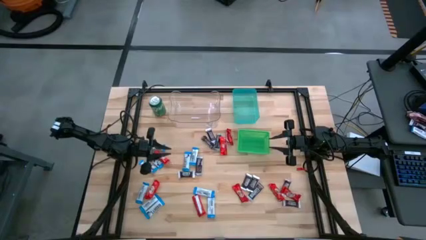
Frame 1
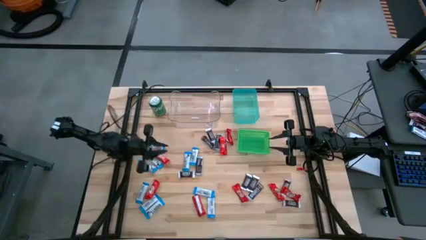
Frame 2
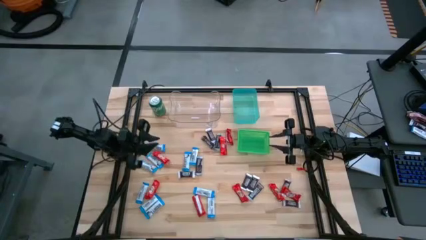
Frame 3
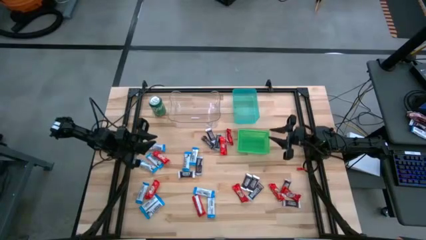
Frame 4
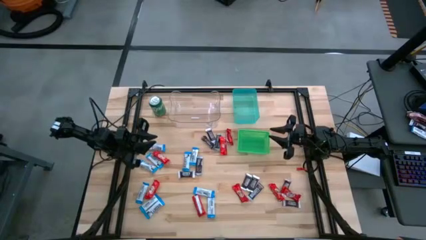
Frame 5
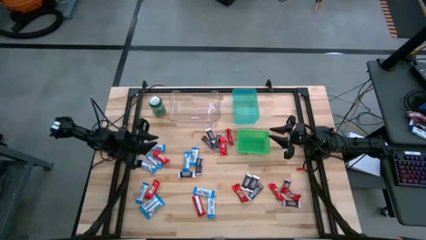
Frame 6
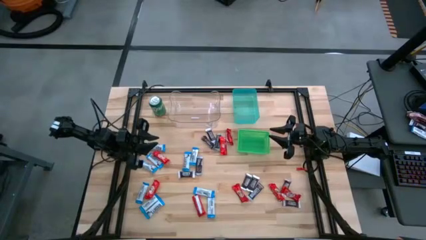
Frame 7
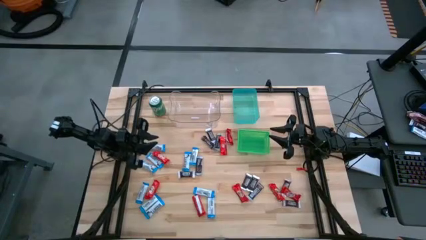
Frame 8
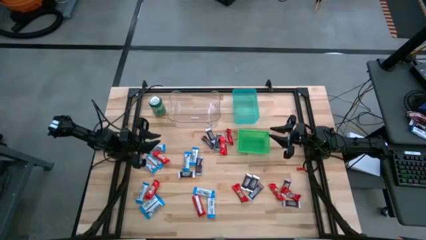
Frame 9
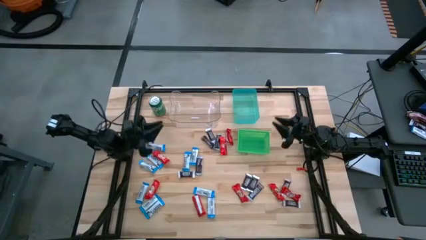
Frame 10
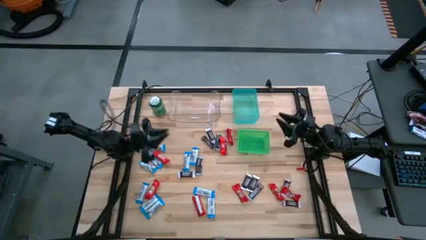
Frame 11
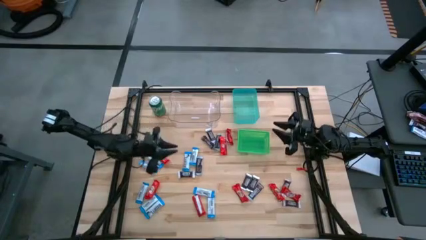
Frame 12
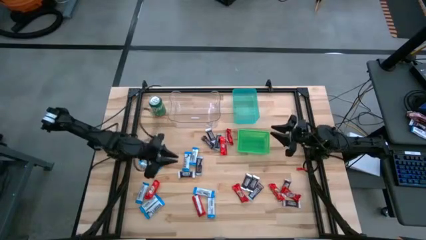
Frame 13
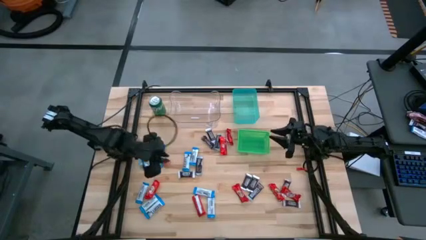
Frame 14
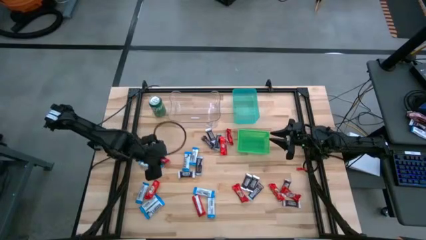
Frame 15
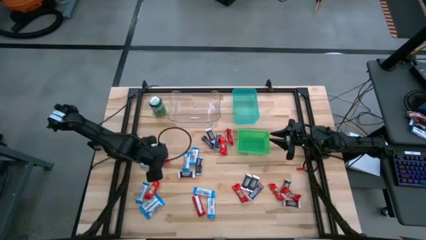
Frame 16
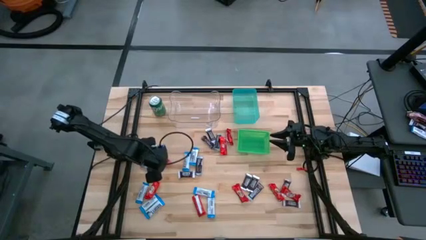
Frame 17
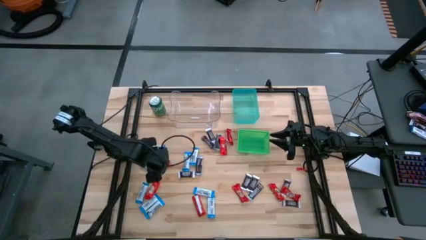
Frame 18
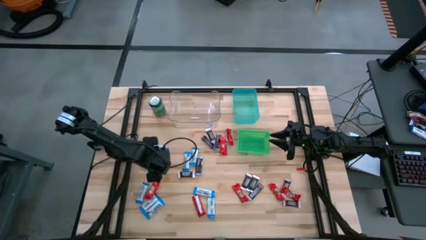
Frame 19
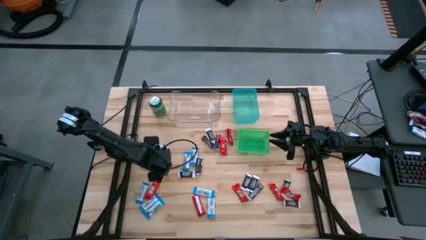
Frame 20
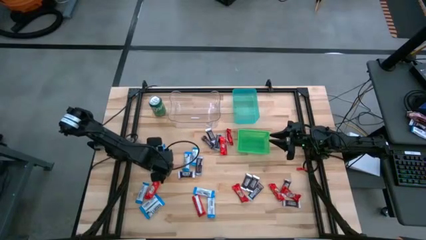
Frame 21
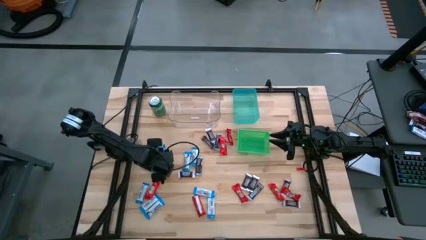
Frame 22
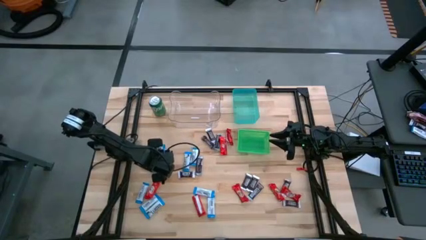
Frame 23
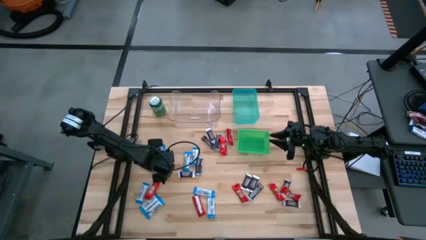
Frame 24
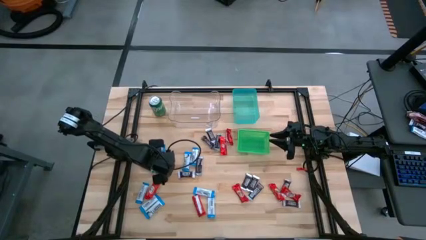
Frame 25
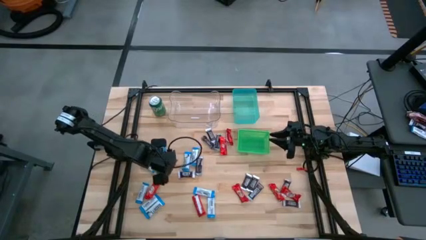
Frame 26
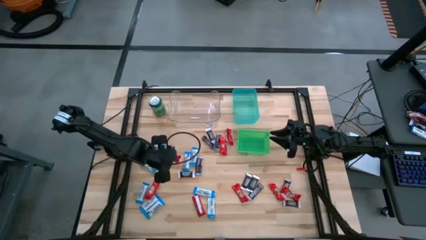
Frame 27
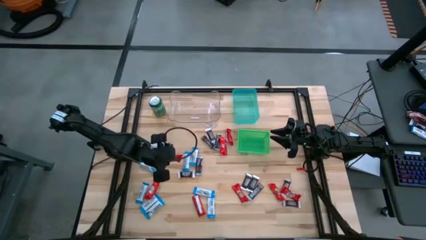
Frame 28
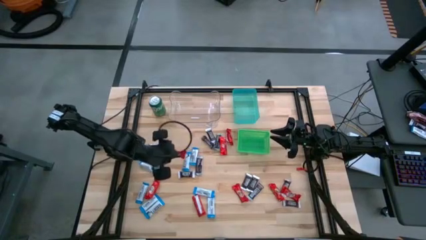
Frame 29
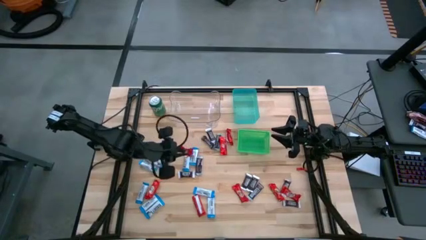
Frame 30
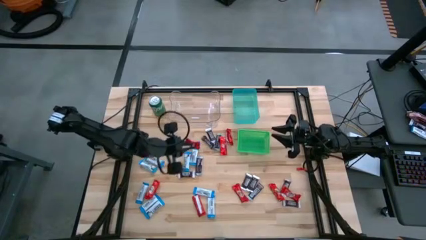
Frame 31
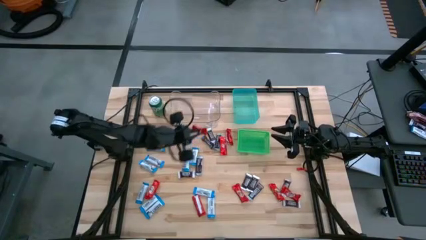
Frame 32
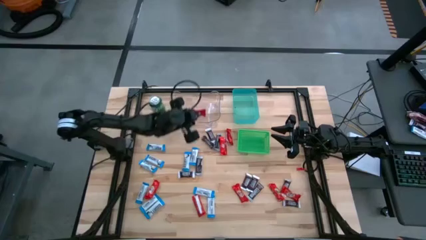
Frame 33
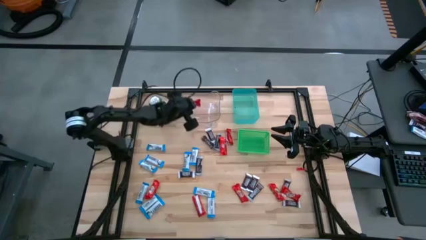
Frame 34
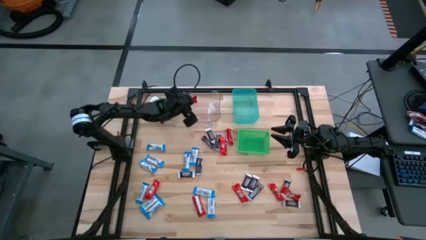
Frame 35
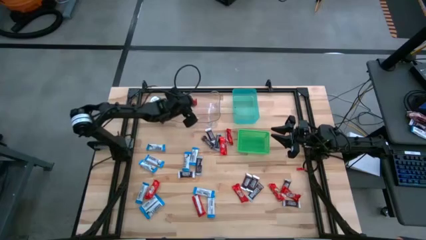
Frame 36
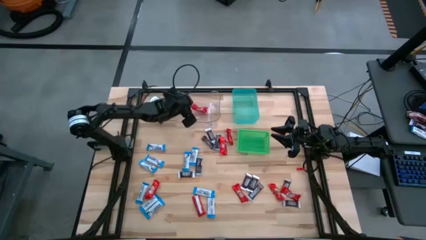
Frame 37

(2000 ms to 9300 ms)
Task: Sort candy
Put the red chocolate bar into the transparent bin

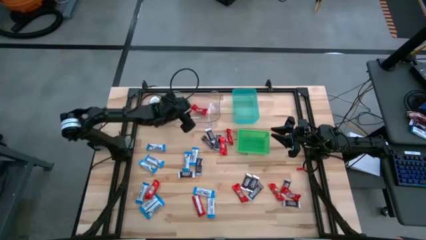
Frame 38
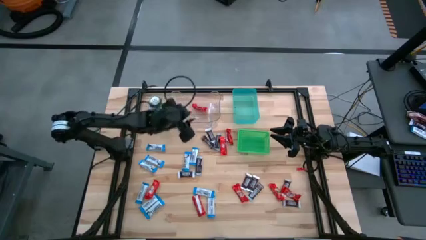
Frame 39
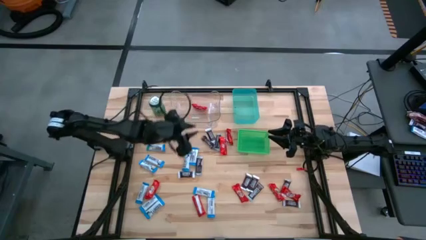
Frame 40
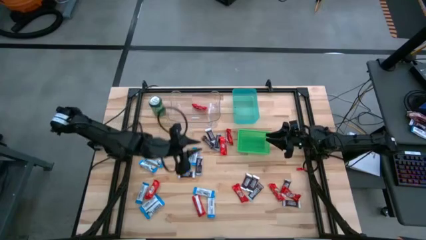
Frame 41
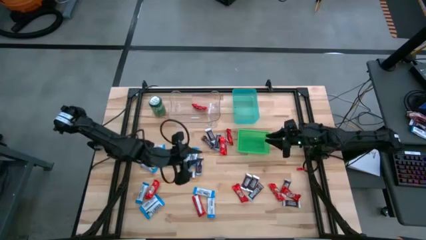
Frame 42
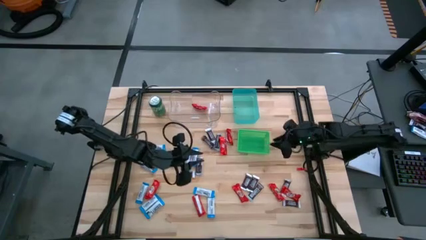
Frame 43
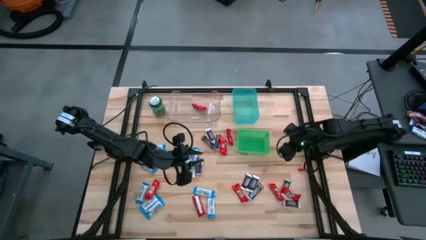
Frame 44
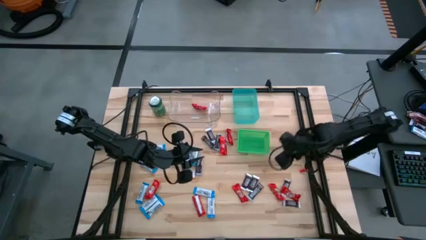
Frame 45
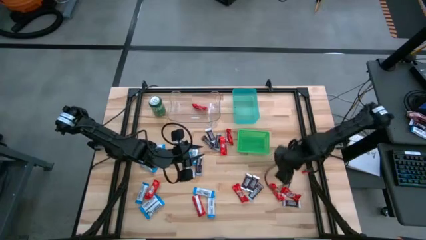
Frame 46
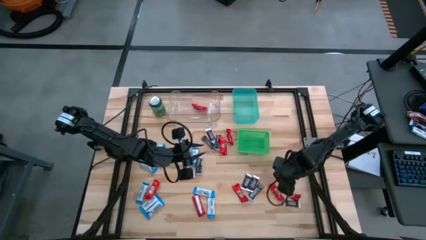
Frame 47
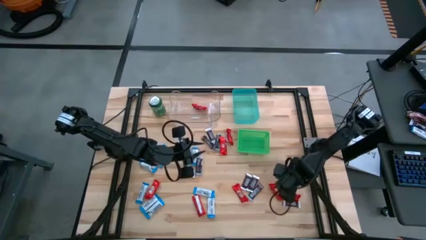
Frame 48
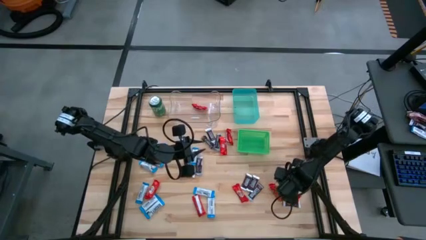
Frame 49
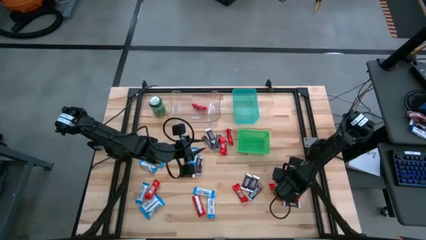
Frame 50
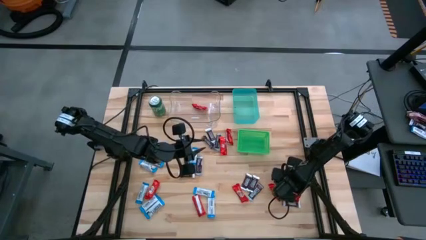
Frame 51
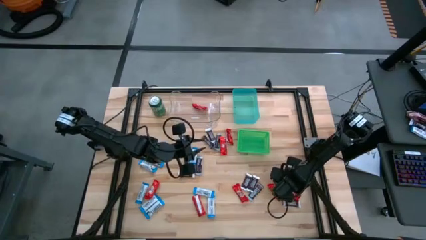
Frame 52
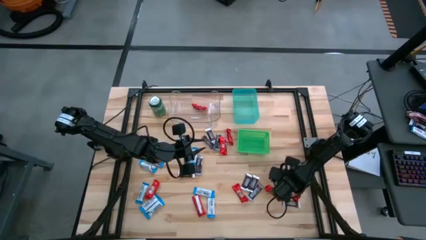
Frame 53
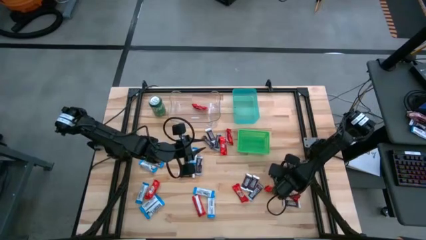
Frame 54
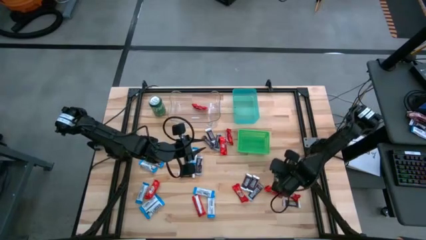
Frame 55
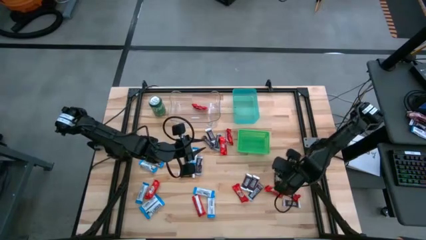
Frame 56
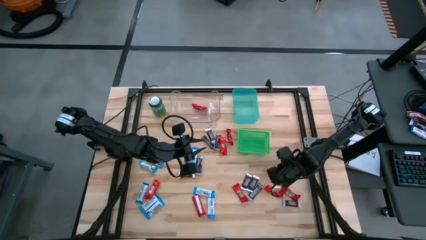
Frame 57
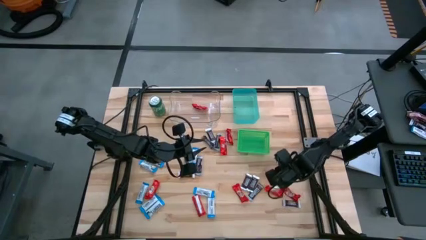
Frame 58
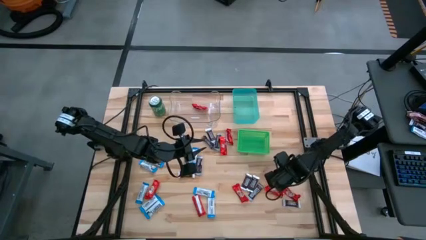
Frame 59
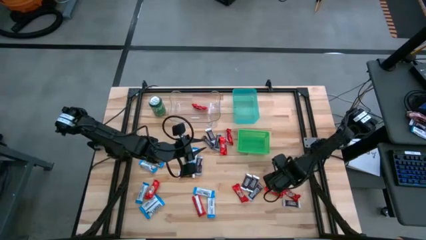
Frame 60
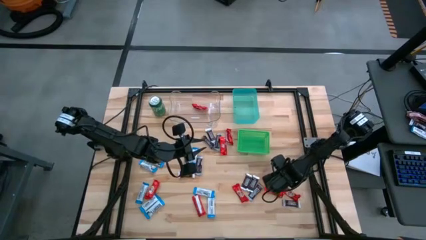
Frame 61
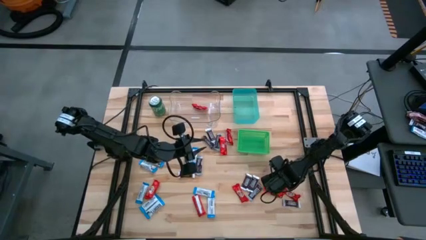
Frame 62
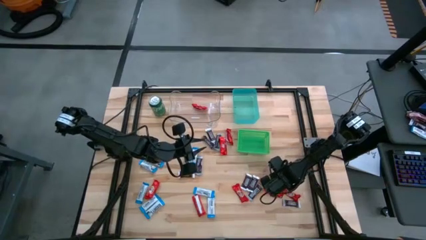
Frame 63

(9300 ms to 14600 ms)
Put the brown chocolate bar into the green bin

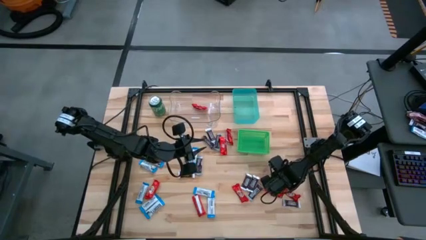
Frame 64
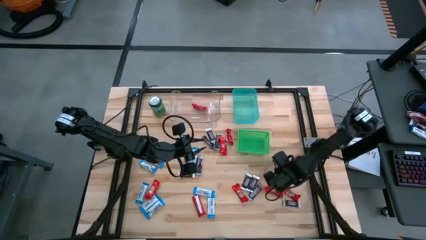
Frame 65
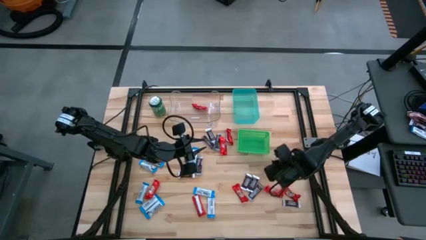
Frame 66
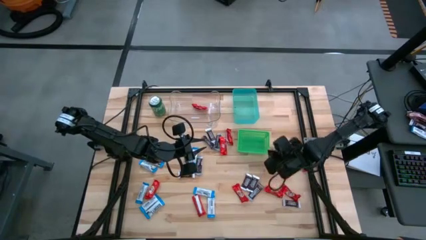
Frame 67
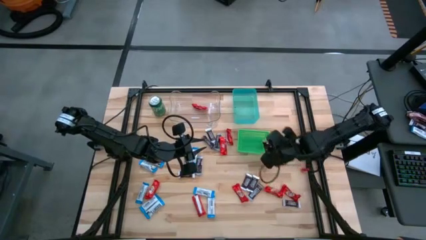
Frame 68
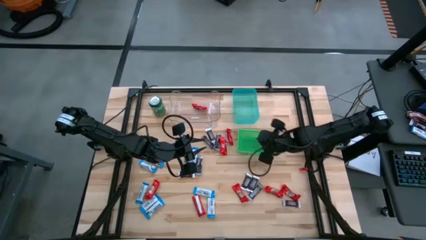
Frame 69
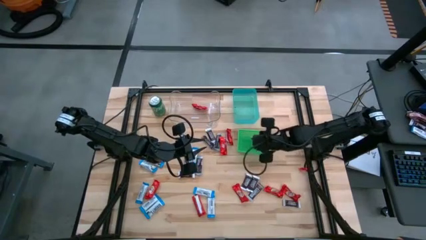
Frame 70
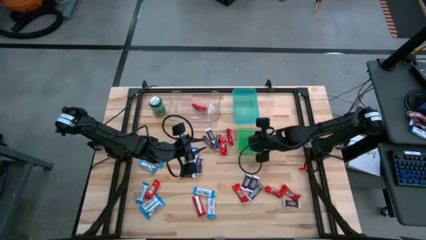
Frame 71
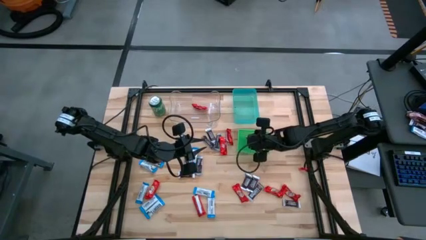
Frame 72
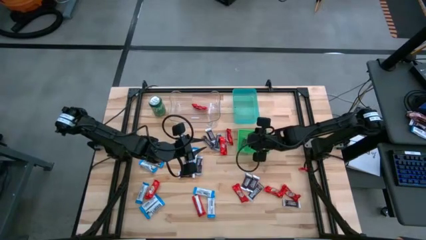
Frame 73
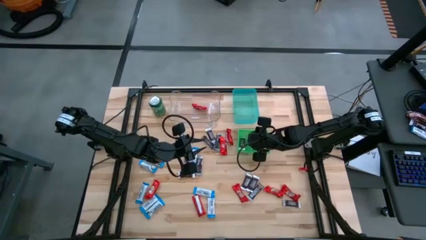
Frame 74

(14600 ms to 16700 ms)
Put the brown chocolate bar into the green bin

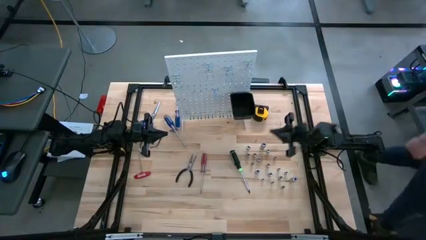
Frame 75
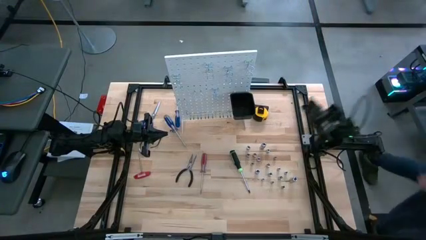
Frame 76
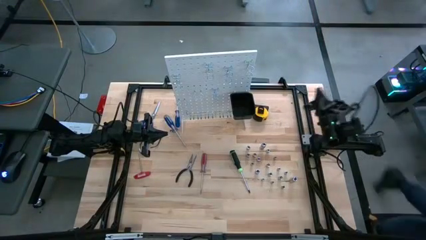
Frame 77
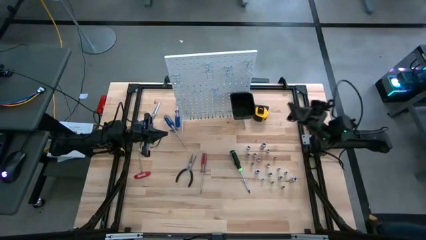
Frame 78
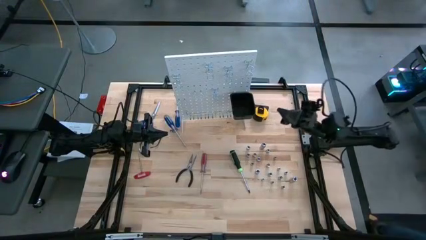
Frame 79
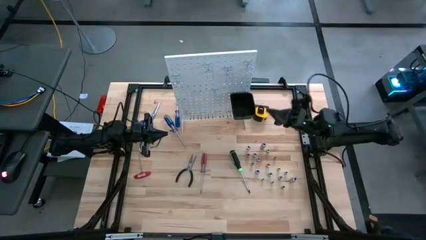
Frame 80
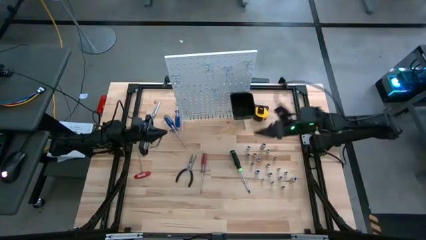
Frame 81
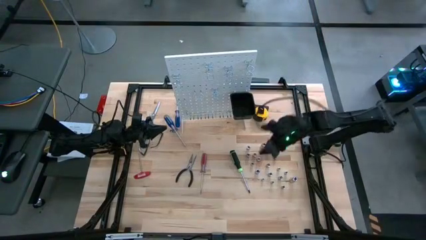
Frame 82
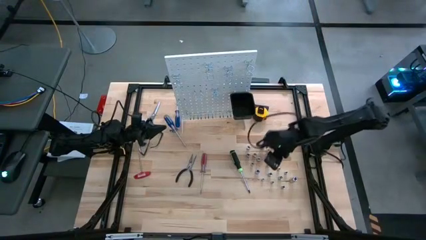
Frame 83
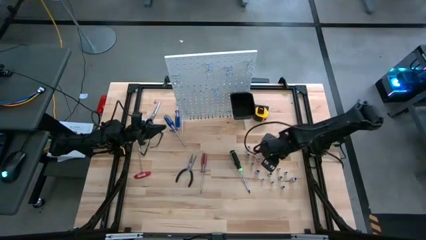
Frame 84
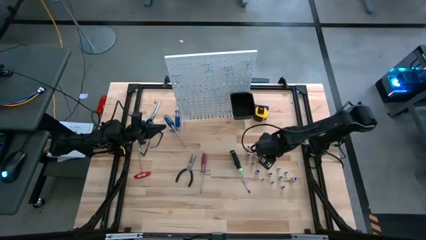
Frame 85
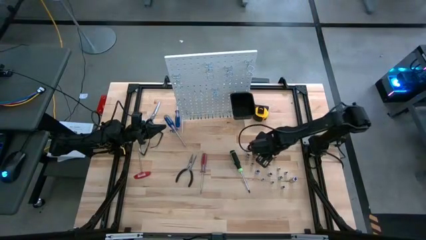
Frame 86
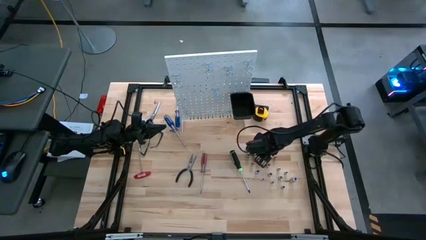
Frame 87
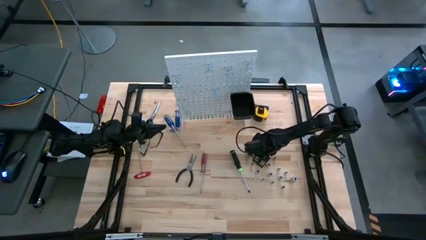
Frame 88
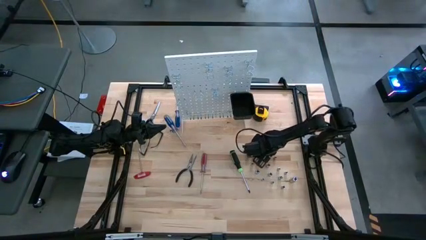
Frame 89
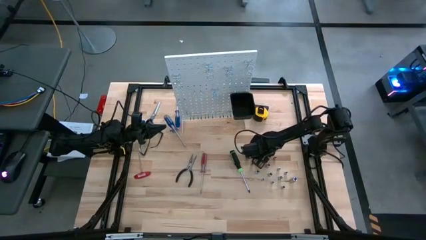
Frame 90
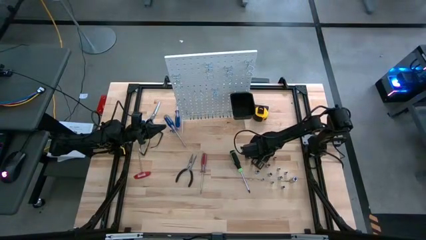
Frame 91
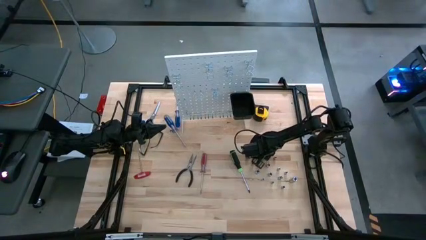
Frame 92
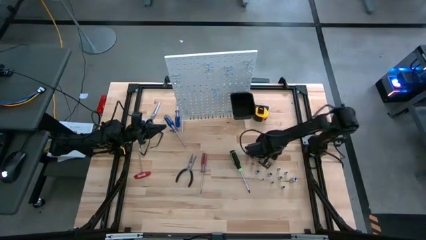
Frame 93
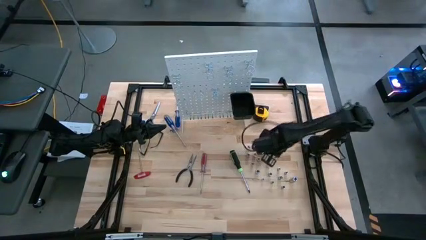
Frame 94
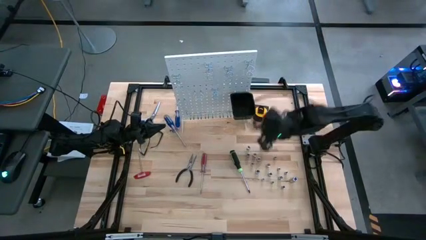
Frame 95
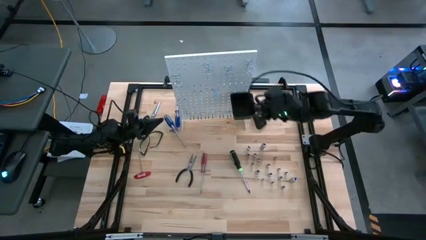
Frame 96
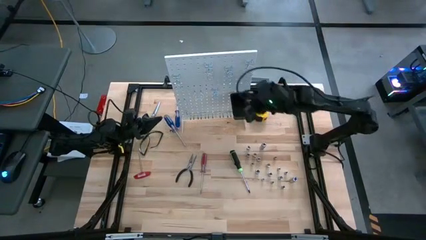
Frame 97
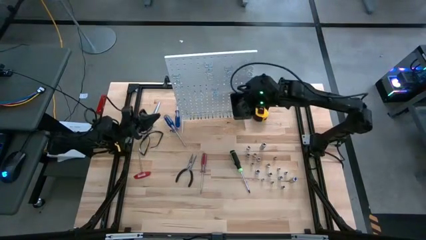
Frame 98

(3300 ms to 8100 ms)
Task: Hang tools onto peg board
Put the silver socket into the black bin on the peg board
